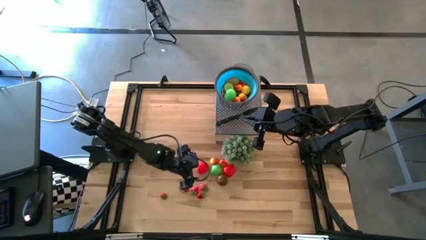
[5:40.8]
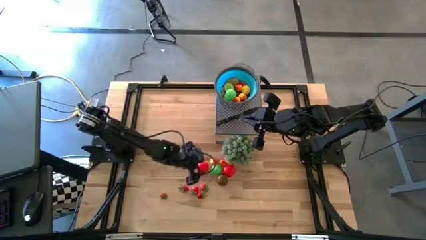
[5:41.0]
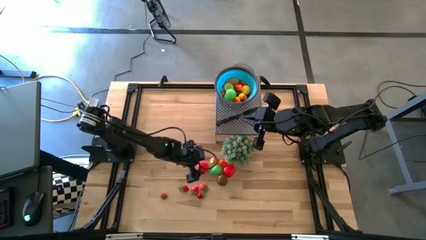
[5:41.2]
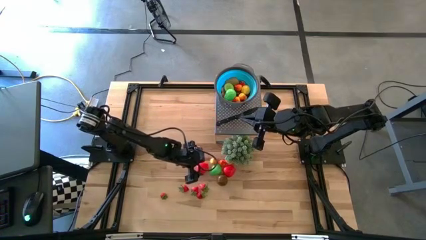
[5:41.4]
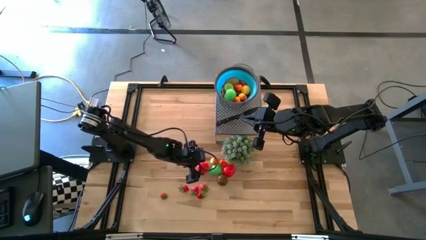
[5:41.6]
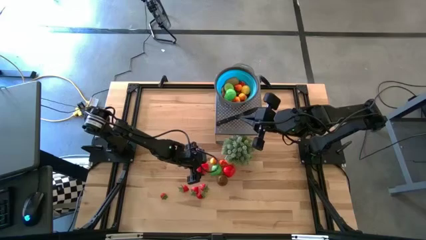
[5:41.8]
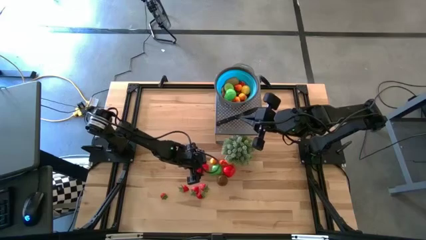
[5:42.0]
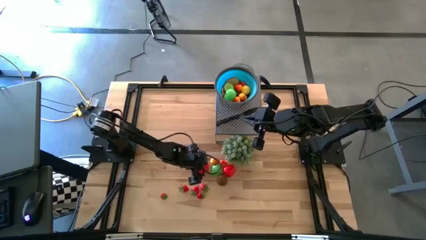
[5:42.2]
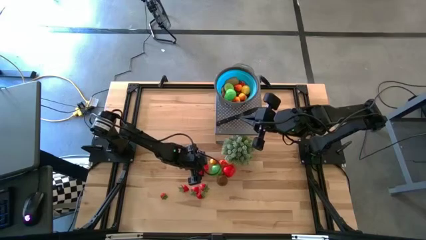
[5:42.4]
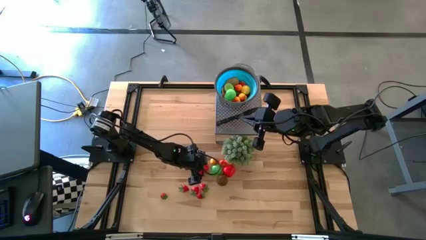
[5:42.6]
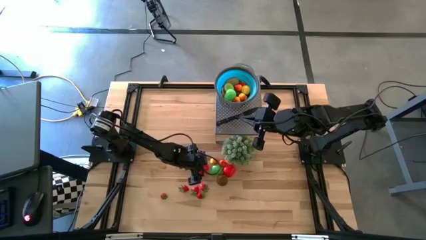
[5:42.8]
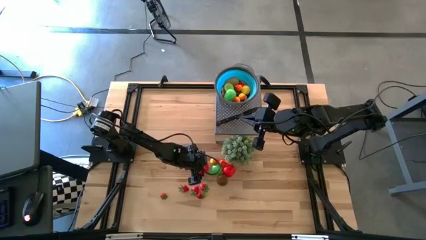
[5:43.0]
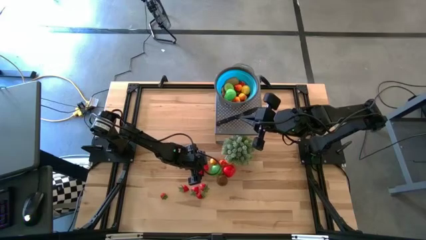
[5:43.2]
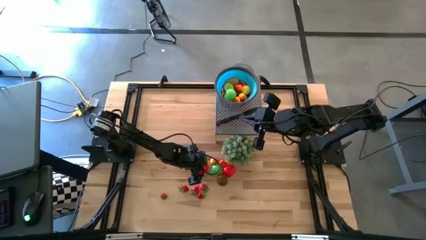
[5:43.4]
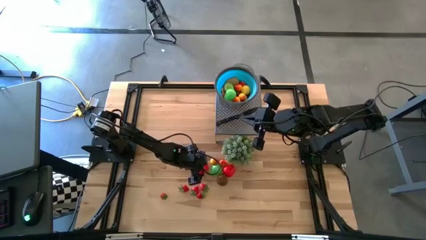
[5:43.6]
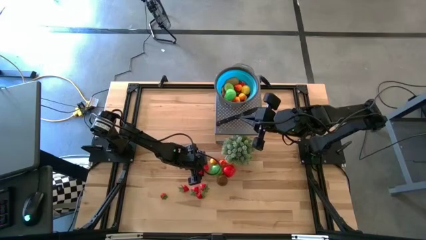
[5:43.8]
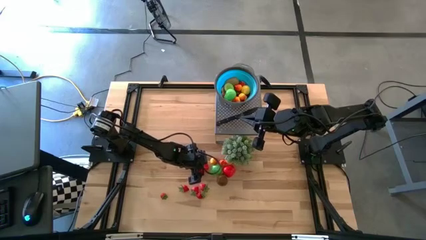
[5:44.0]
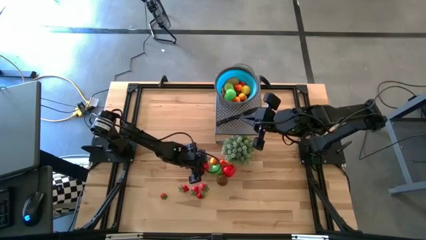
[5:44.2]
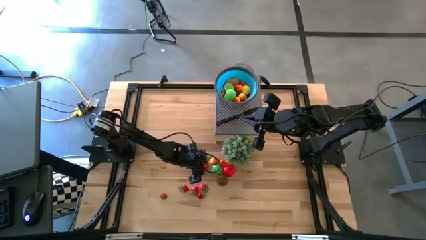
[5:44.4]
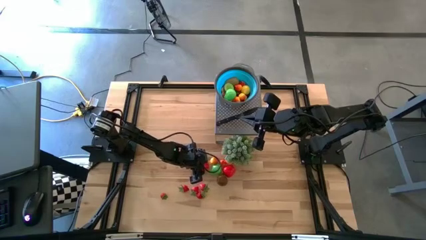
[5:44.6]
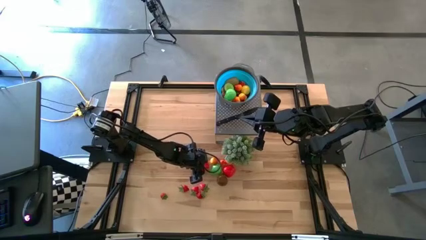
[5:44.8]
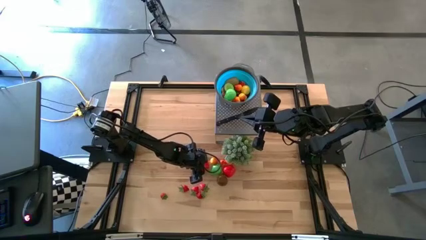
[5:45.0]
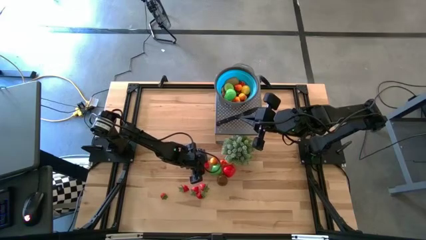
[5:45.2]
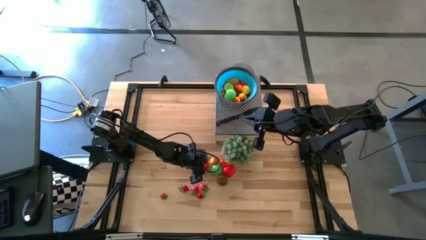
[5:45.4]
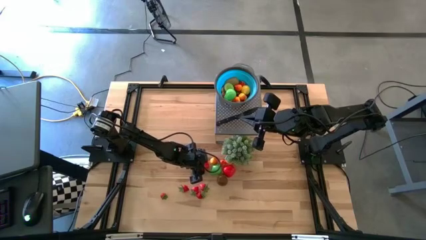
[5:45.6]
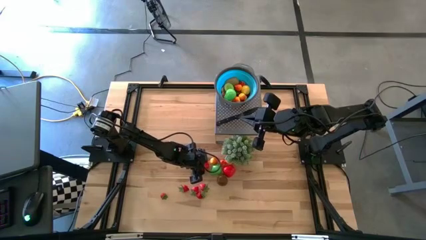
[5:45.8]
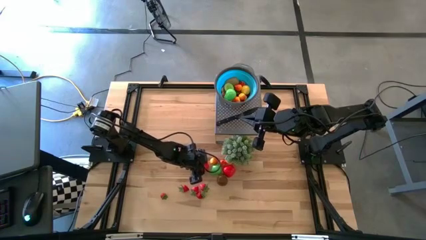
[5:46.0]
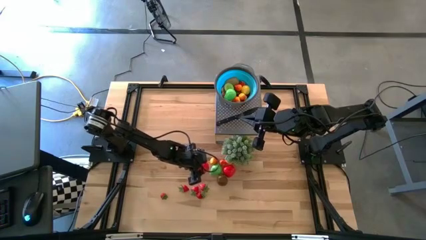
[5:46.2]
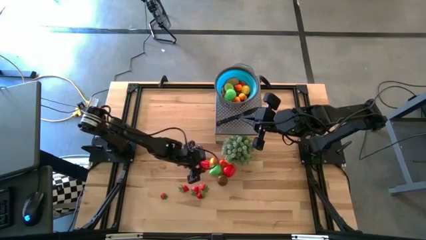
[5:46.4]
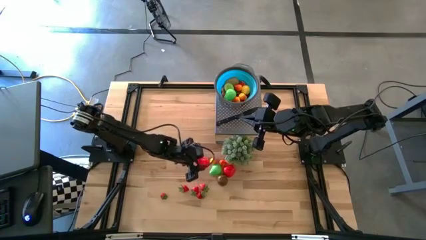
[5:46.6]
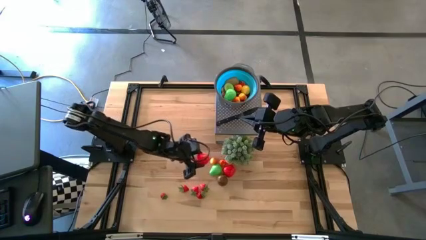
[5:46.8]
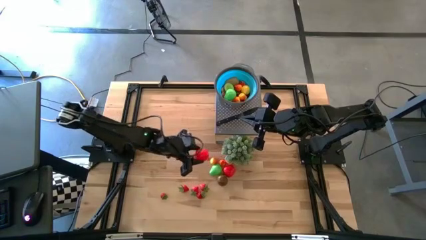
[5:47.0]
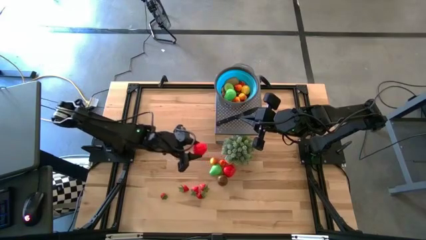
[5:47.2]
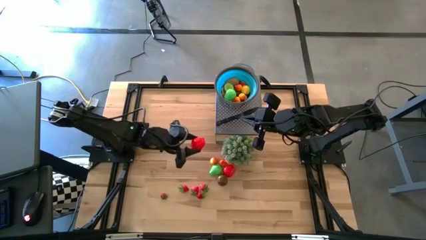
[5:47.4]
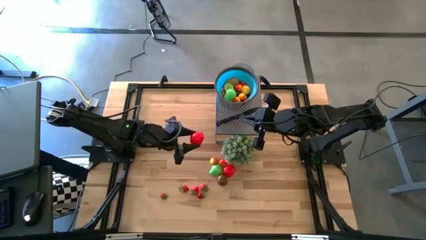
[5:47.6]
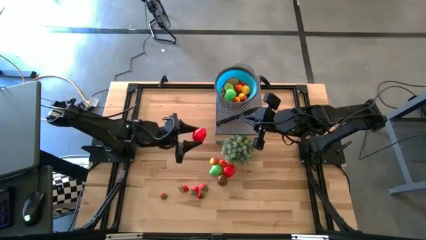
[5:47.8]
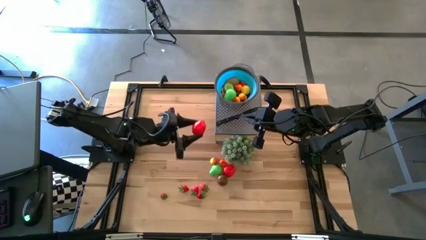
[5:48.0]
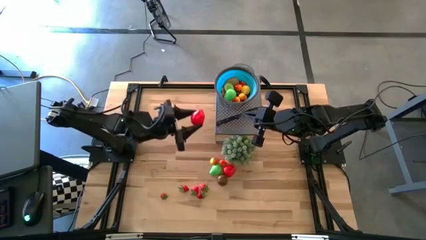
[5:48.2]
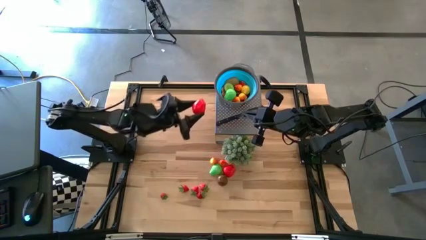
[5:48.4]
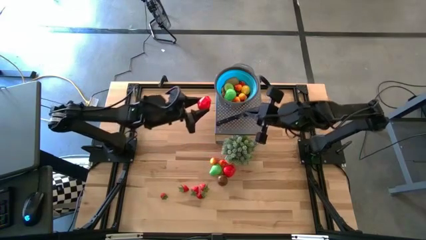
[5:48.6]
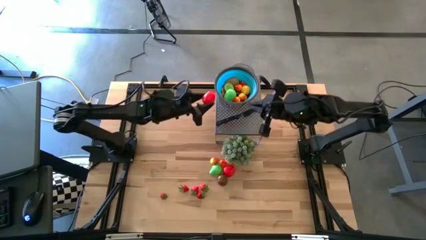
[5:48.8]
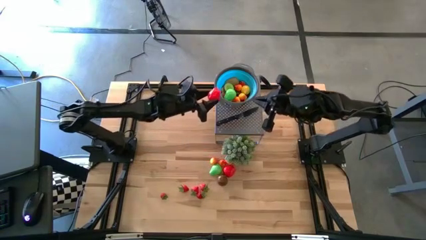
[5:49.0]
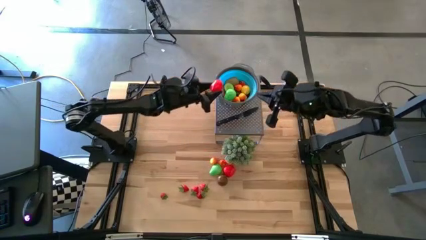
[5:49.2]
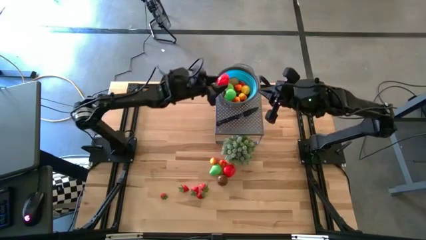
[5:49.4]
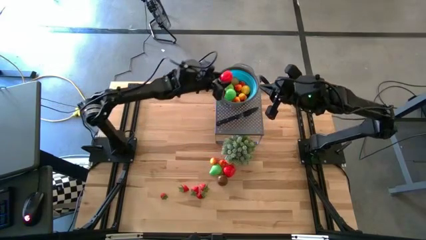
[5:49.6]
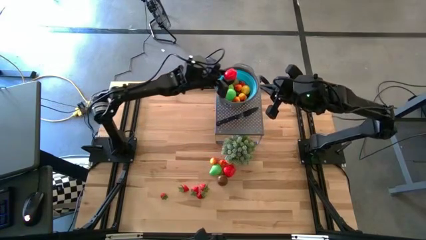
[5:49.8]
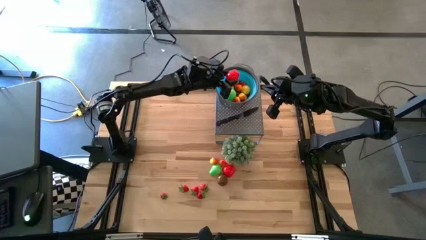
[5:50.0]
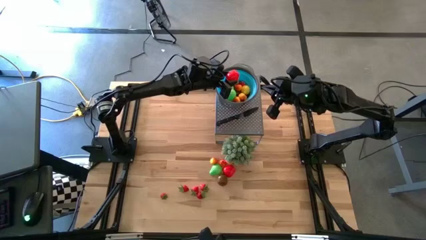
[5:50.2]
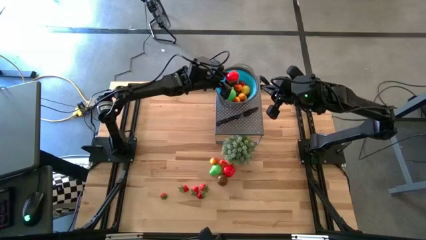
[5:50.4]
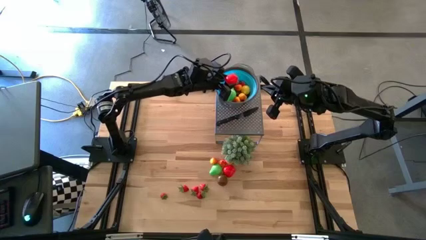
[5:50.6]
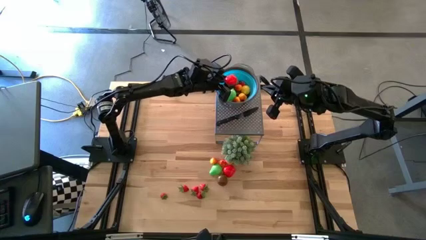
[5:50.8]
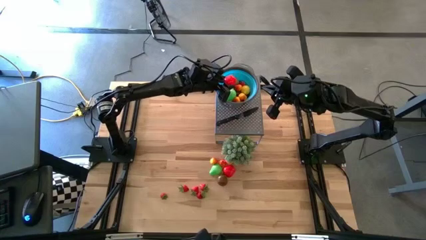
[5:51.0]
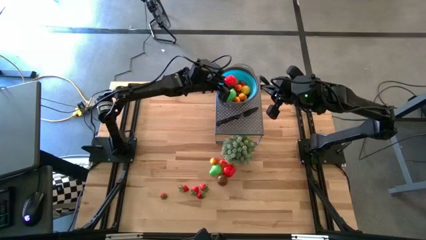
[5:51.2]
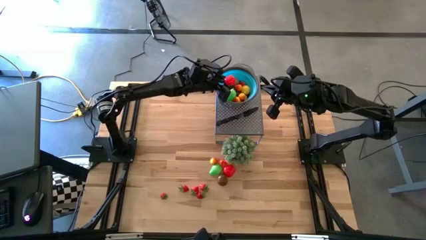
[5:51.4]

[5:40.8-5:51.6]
Task: Pick & Place Fruit
Put the red apple into the blue strainer bowl

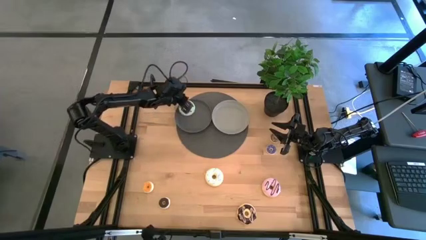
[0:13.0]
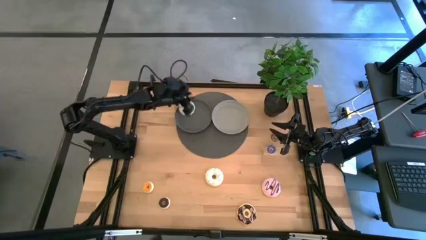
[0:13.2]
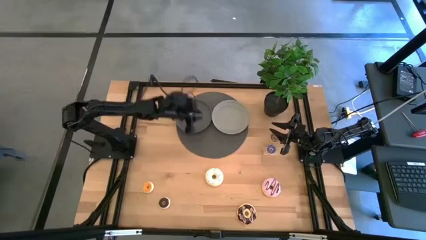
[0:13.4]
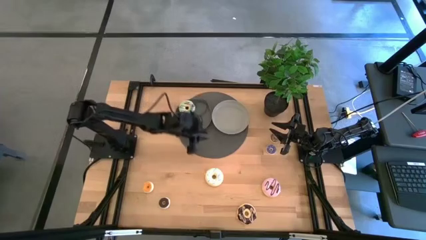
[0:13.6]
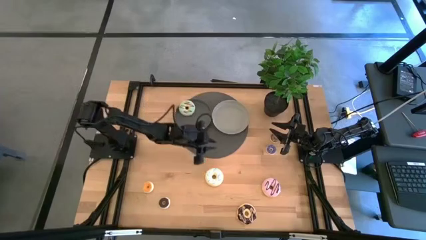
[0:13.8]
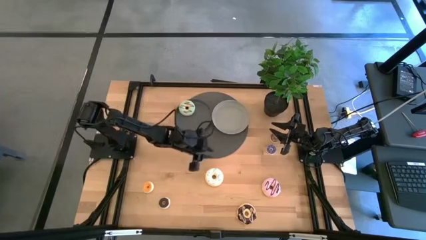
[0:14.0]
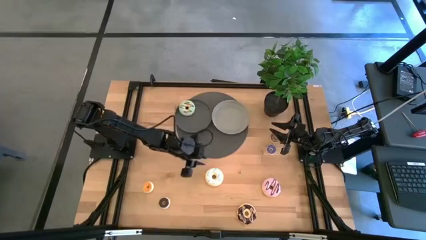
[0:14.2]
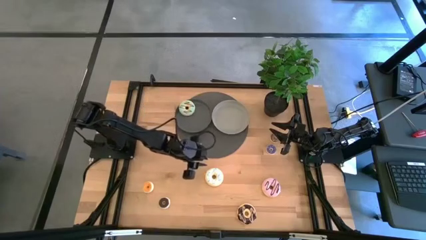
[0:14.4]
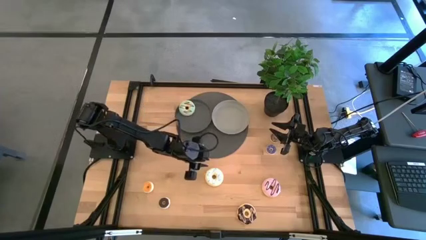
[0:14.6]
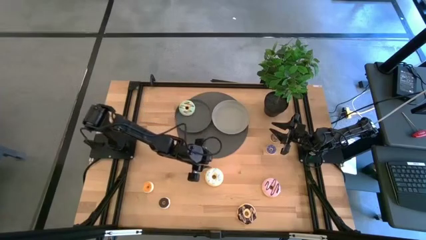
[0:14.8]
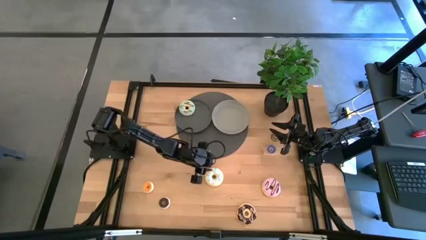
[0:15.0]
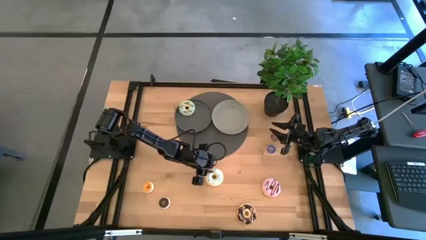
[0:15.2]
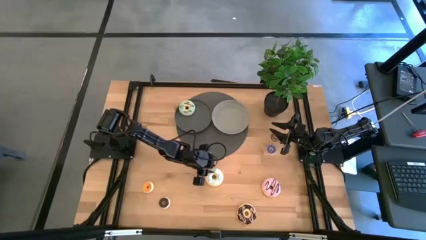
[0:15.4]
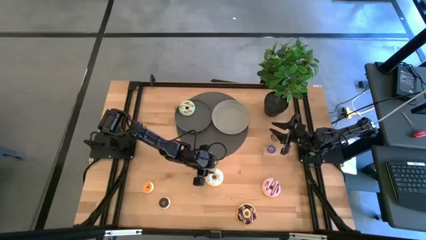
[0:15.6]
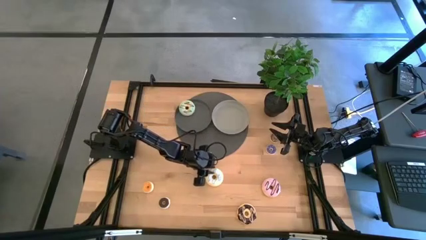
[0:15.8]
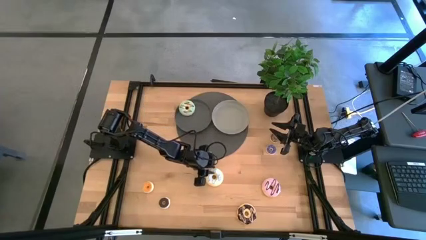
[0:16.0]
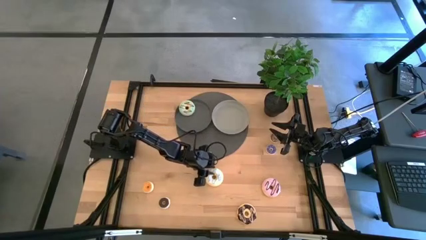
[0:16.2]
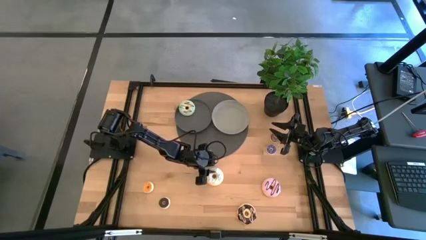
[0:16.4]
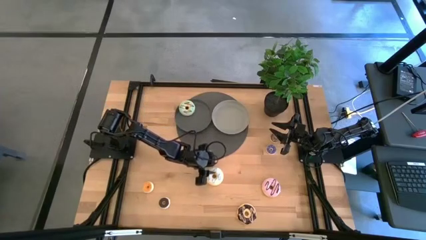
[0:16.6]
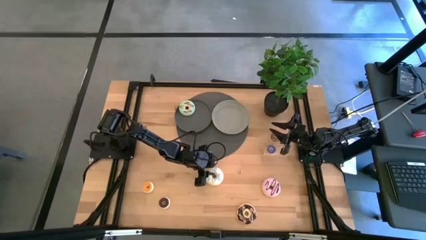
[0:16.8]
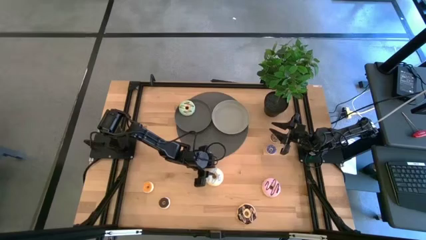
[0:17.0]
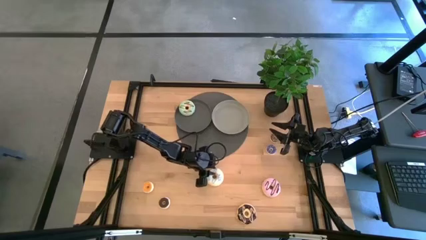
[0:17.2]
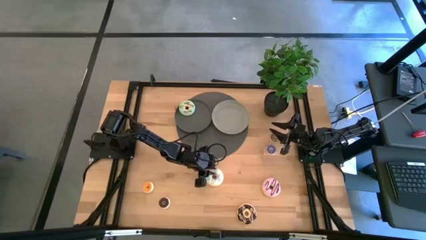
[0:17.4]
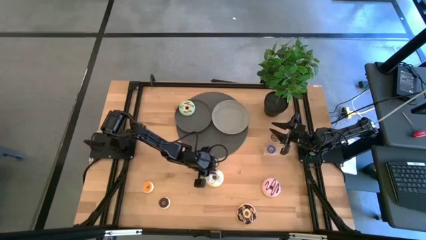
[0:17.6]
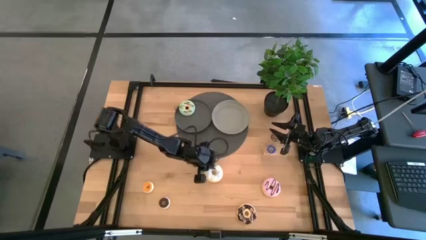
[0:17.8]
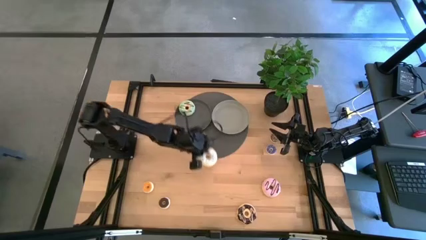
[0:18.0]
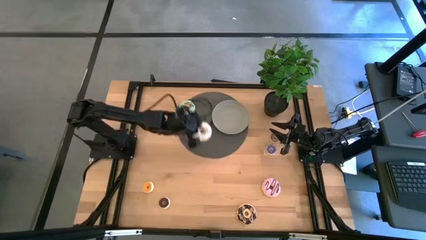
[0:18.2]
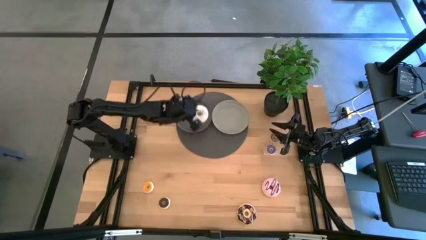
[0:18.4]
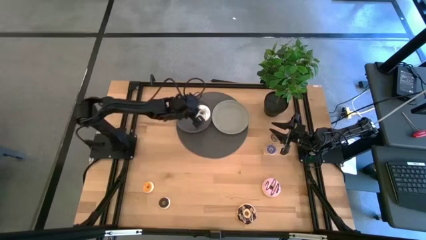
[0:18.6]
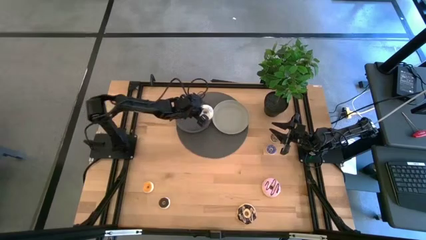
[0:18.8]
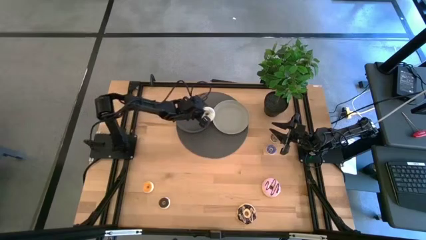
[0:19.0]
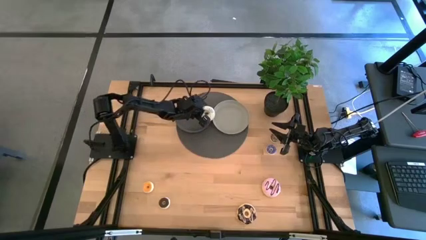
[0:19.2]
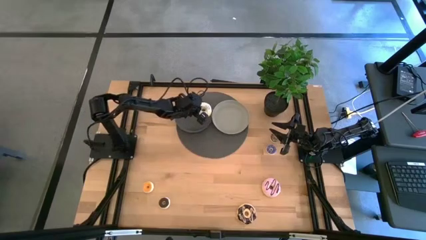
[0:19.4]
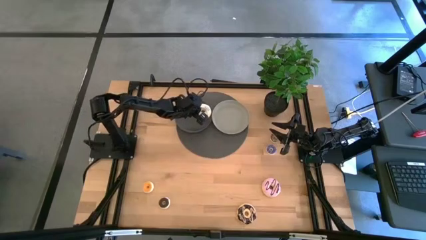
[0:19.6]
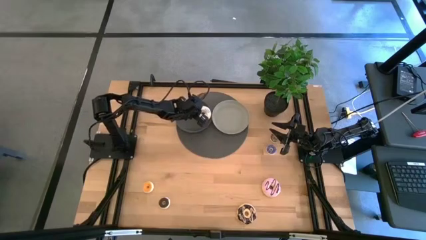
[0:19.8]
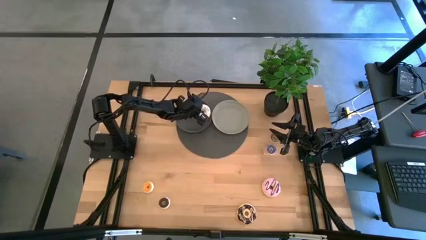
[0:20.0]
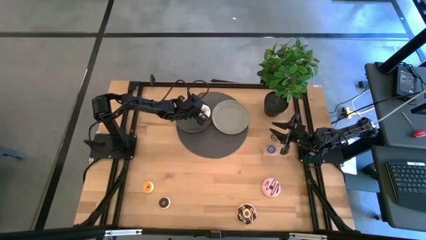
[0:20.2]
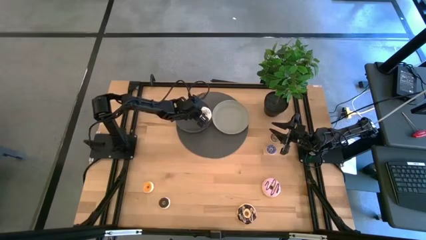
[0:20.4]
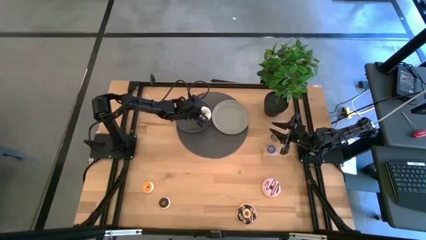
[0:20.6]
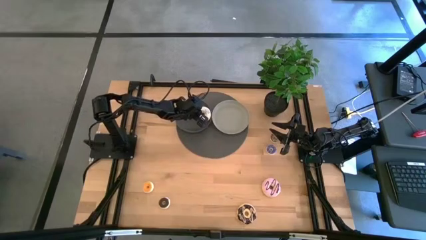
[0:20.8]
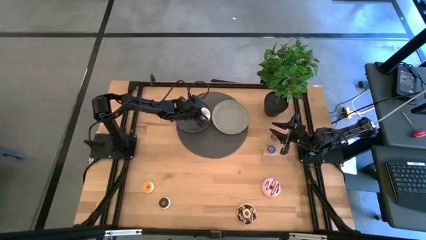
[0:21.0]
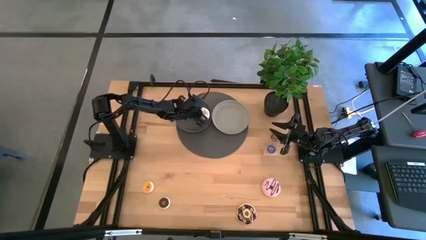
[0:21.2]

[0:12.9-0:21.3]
Task: Pick & Place donuts
Put the big white donut on the black plate
